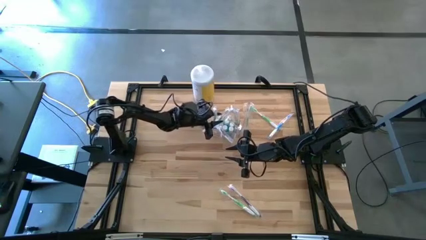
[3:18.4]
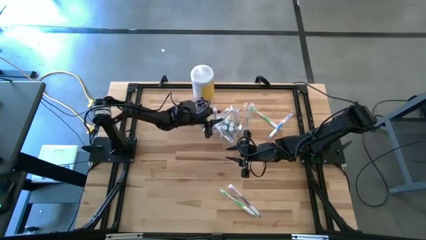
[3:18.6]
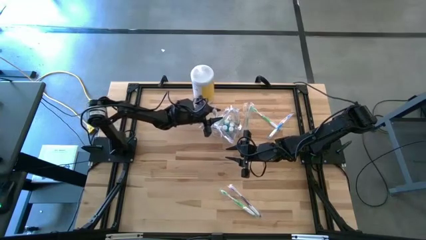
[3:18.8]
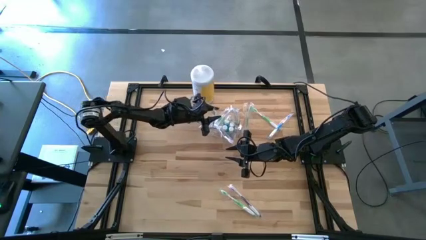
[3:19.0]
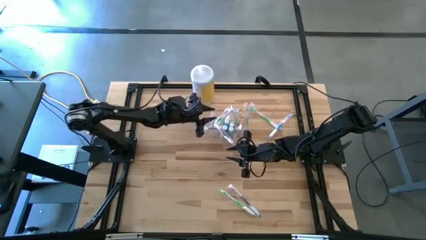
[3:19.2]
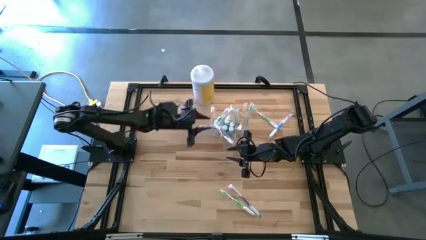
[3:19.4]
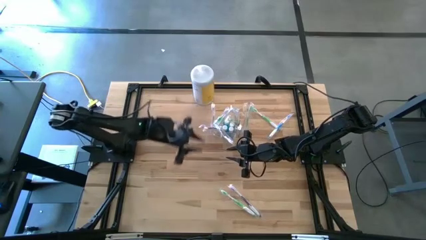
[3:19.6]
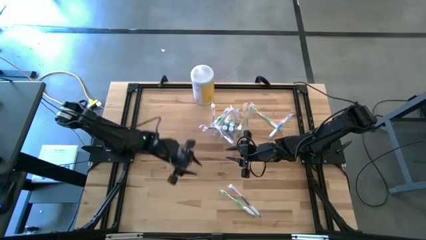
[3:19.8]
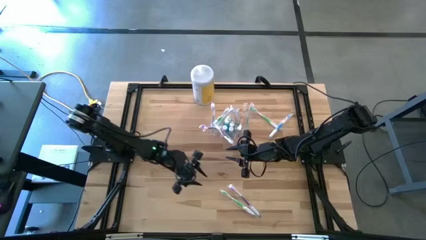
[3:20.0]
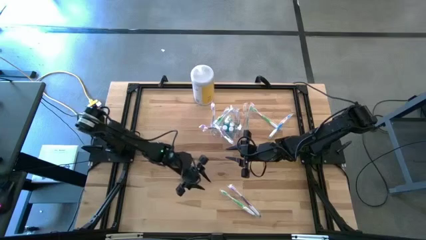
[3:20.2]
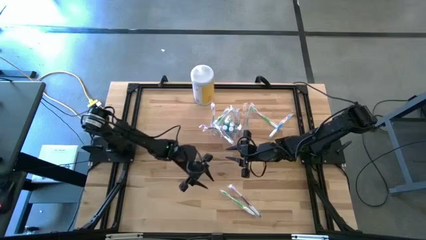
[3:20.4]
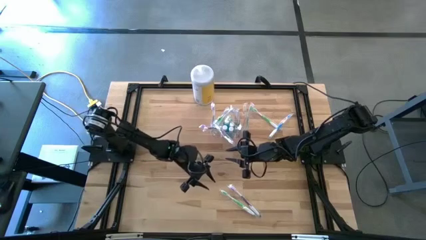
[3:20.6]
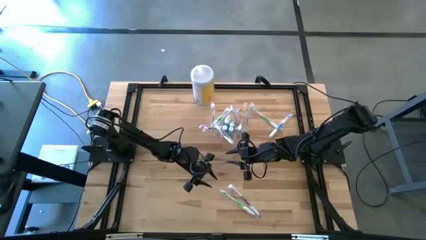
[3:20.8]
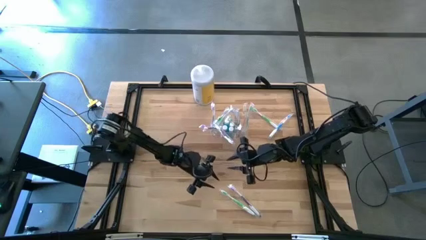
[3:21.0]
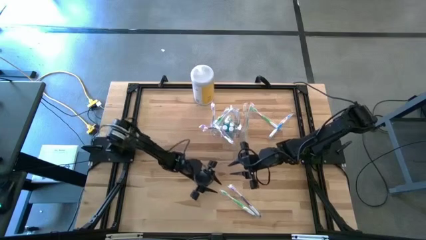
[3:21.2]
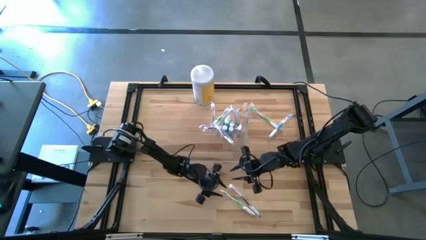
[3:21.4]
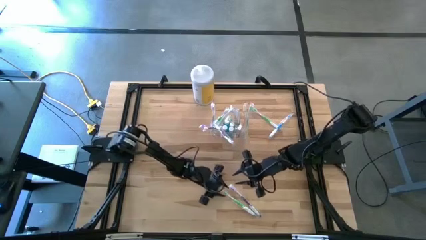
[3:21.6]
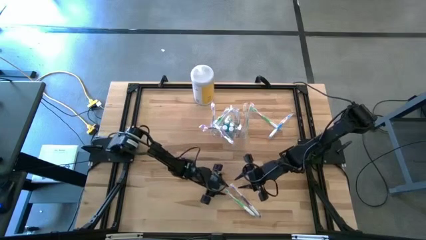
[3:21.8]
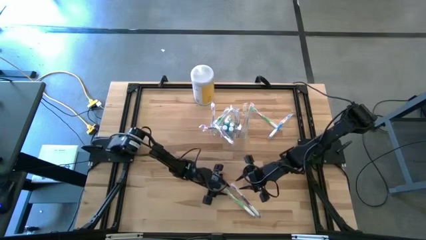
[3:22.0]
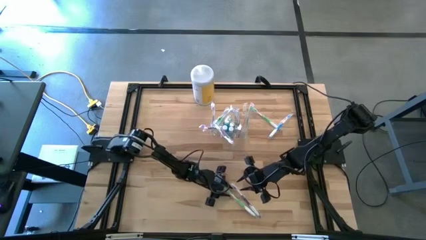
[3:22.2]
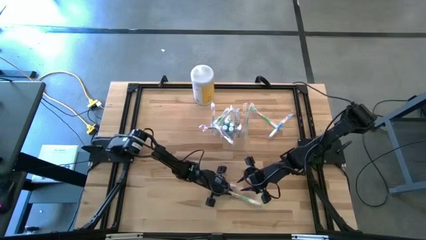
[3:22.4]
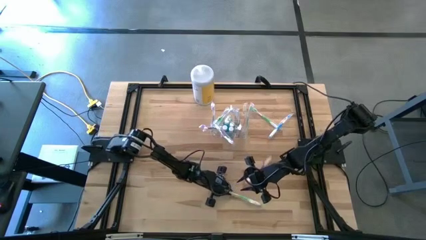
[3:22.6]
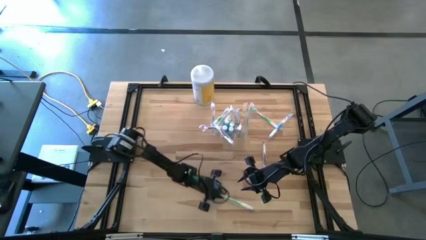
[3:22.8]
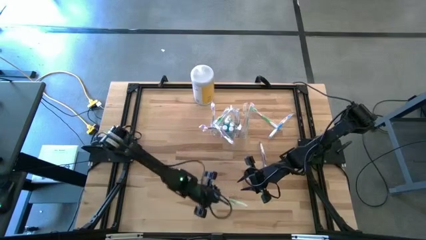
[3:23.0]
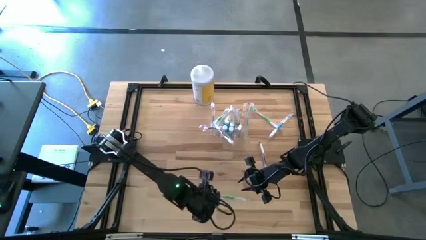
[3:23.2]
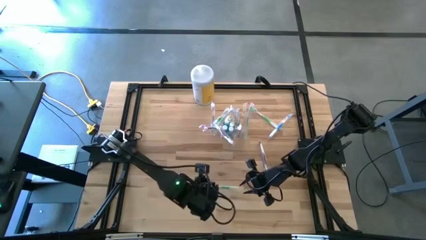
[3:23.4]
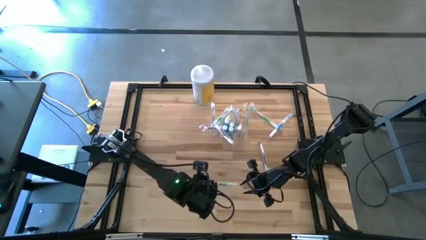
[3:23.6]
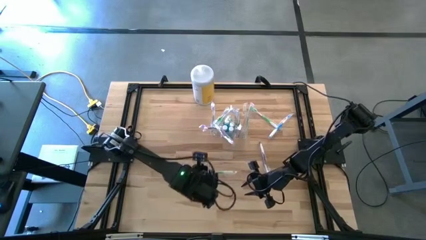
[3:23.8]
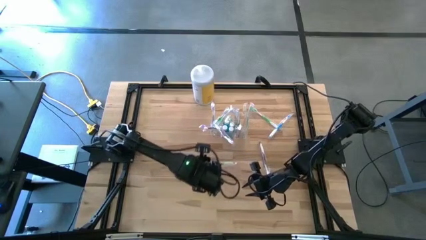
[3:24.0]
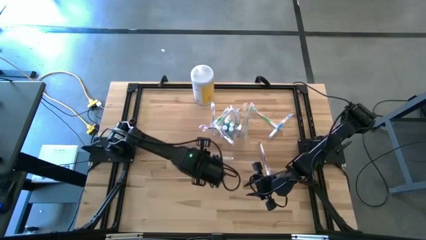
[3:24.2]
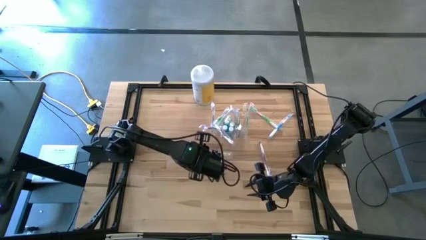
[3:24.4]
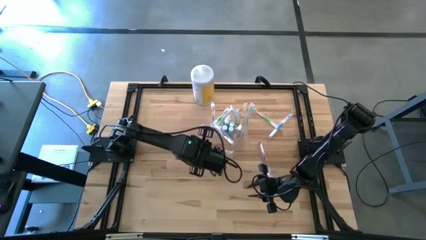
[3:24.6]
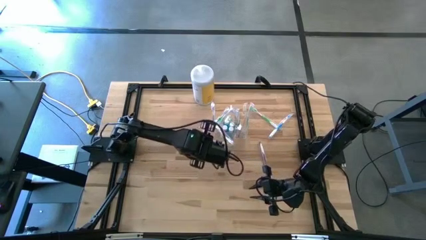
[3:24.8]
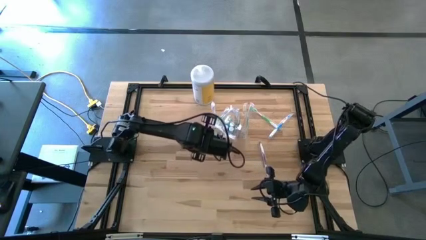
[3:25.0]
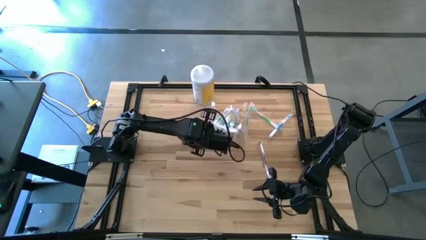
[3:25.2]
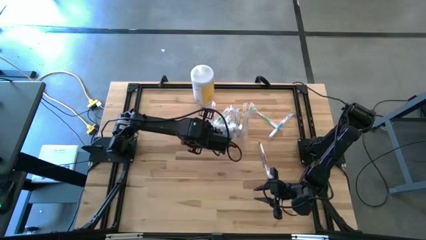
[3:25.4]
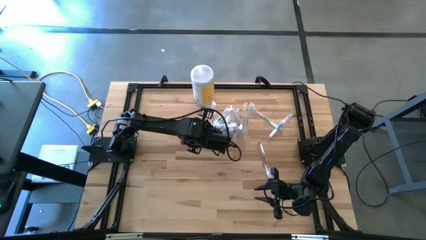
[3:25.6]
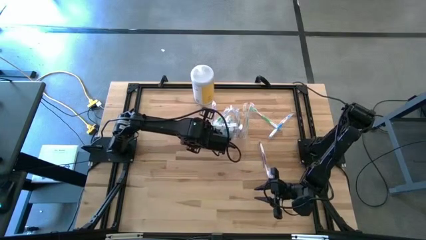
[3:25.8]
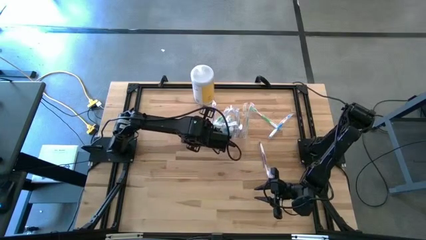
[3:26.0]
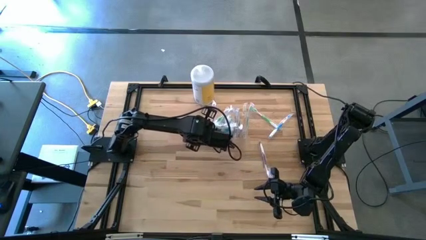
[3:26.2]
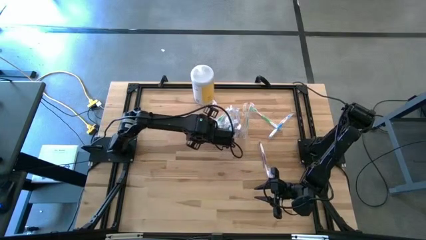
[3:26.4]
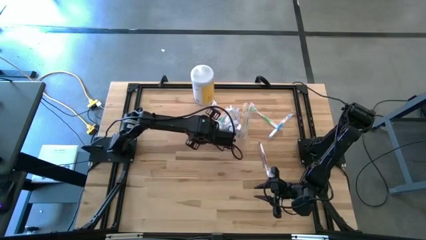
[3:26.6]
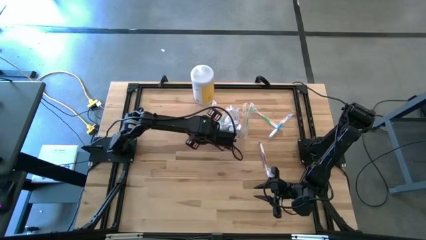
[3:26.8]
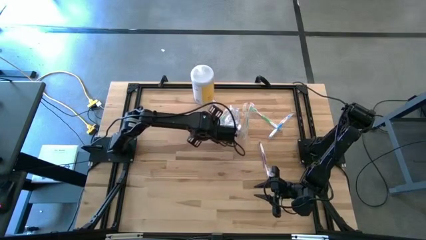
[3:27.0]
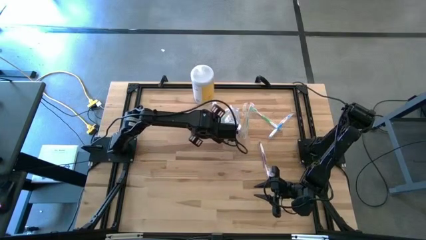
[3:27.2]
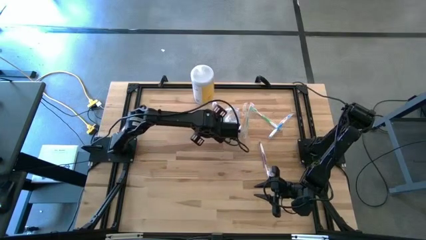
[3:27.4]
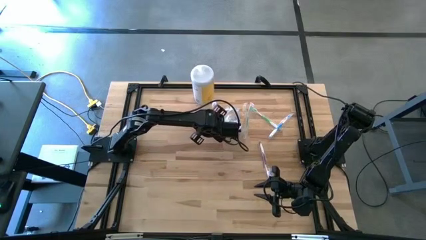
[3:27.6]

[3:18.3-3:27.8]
Task: Pick & Place toothbrushing station
Put the bottom green toothbrush into the transparent organizer

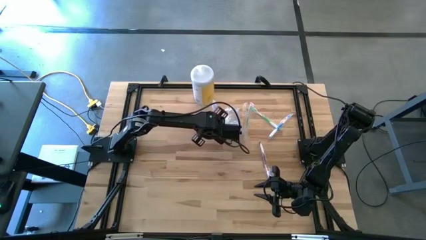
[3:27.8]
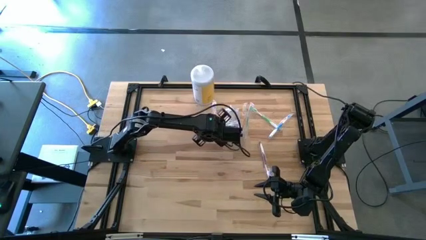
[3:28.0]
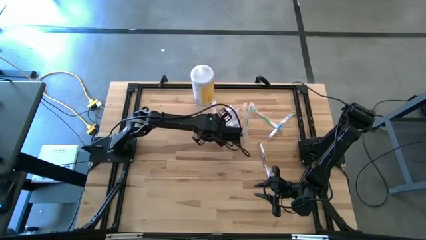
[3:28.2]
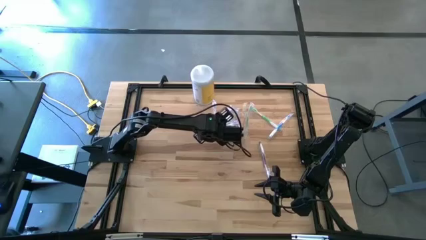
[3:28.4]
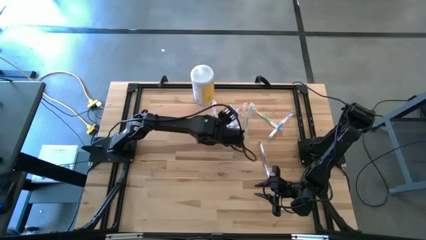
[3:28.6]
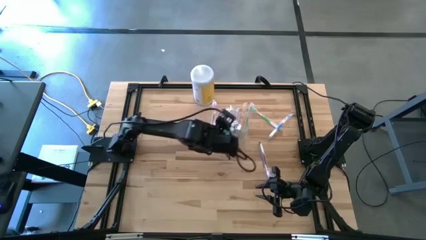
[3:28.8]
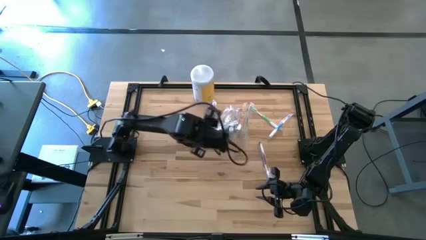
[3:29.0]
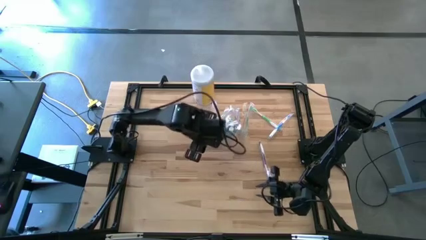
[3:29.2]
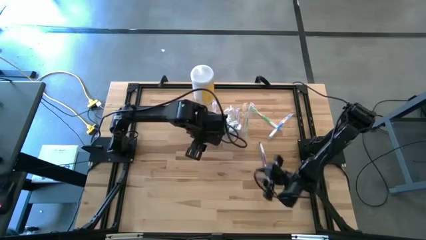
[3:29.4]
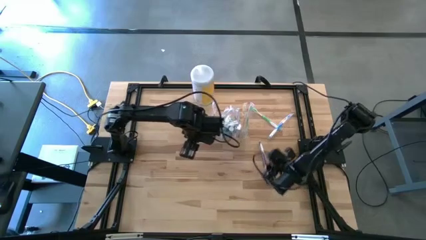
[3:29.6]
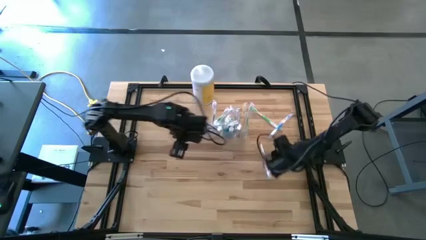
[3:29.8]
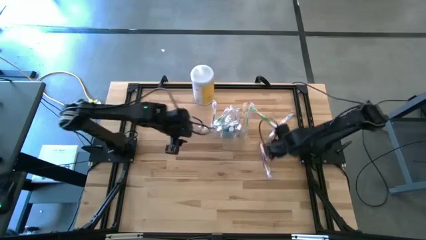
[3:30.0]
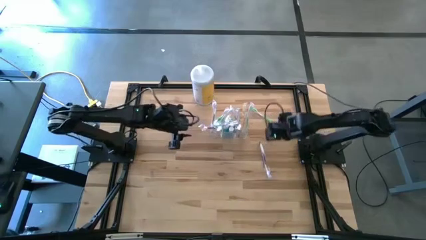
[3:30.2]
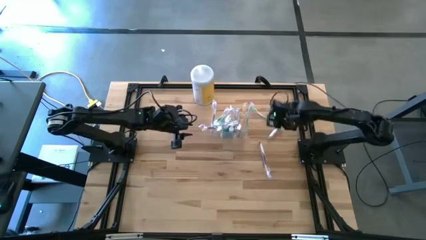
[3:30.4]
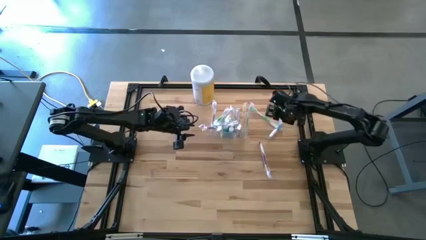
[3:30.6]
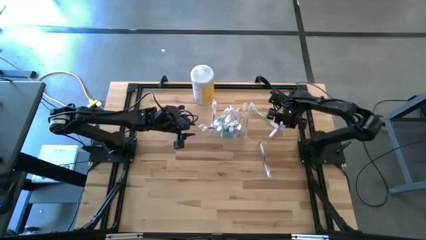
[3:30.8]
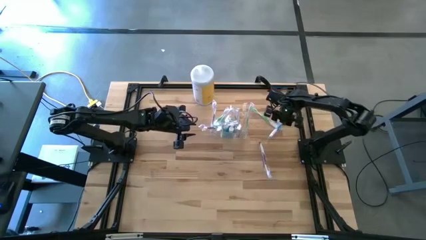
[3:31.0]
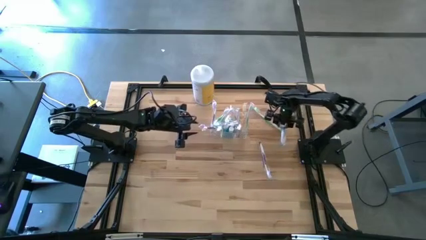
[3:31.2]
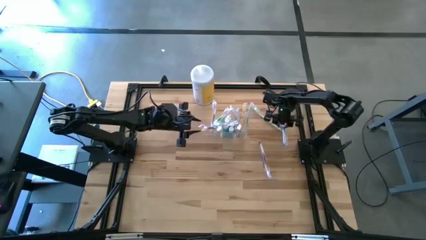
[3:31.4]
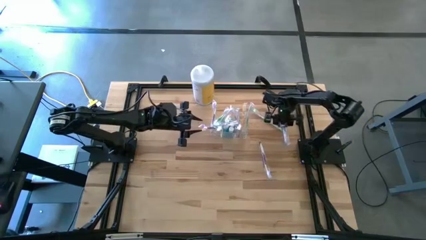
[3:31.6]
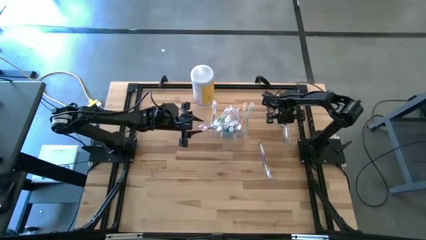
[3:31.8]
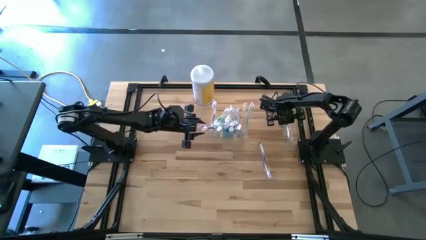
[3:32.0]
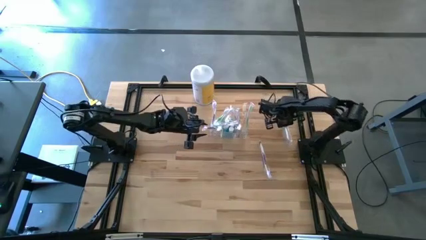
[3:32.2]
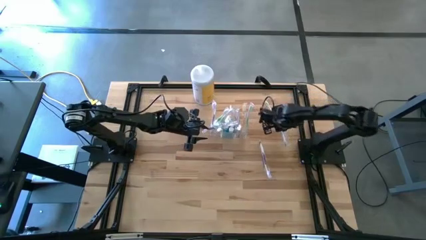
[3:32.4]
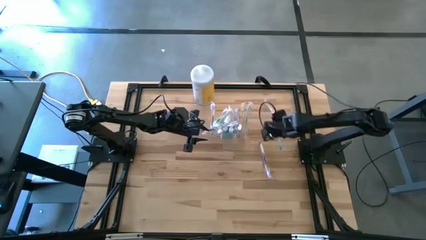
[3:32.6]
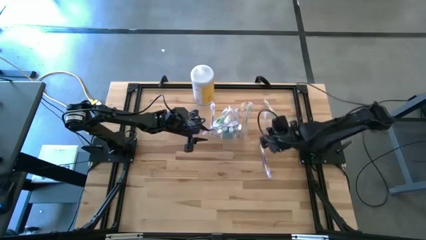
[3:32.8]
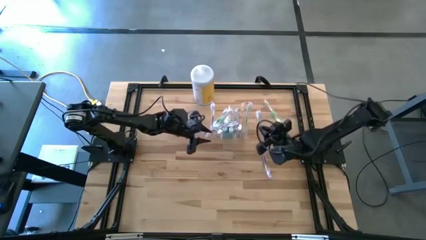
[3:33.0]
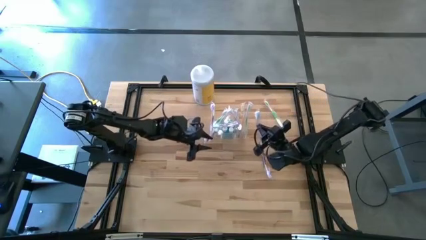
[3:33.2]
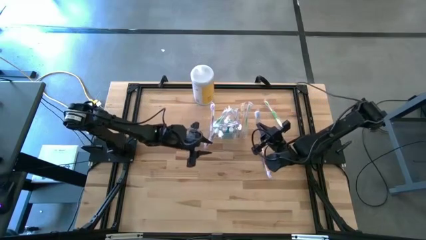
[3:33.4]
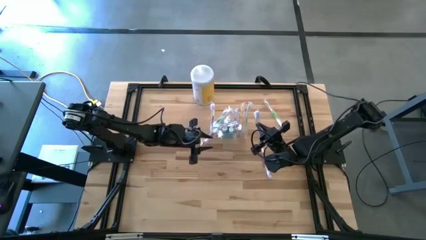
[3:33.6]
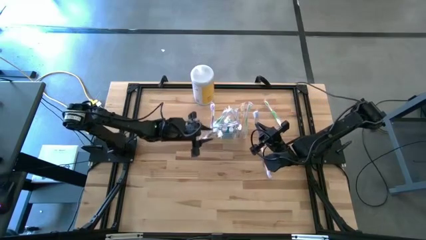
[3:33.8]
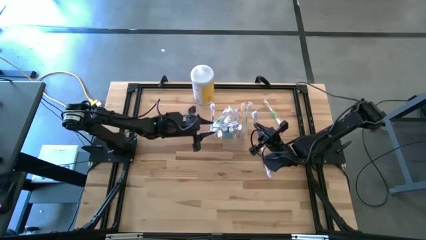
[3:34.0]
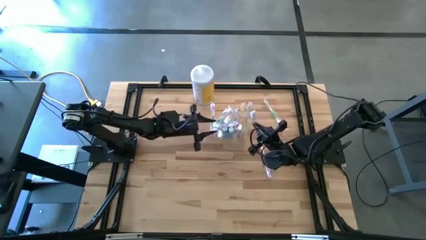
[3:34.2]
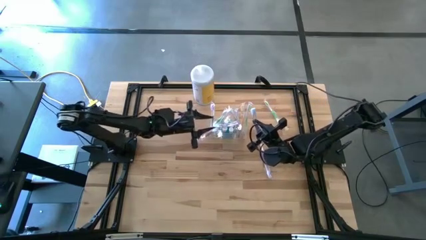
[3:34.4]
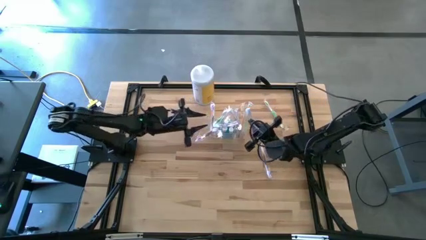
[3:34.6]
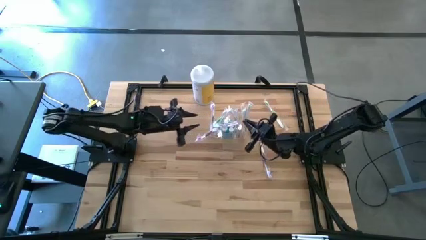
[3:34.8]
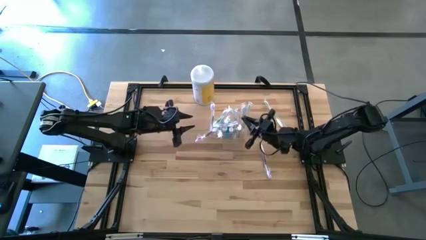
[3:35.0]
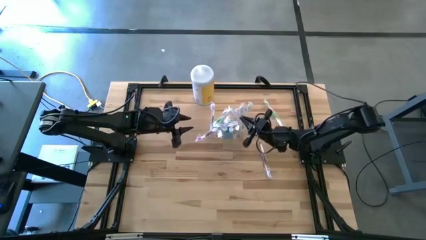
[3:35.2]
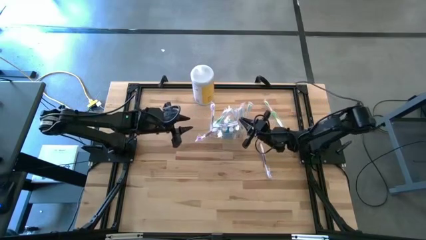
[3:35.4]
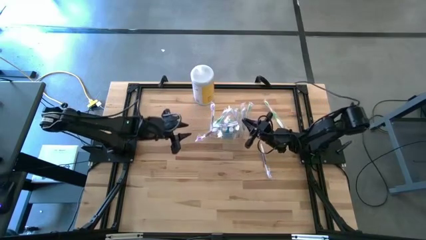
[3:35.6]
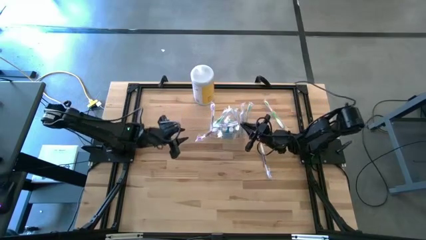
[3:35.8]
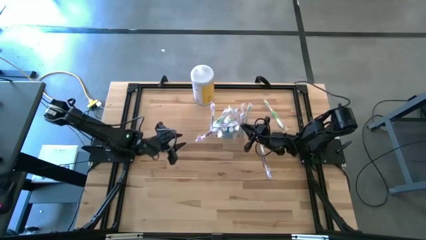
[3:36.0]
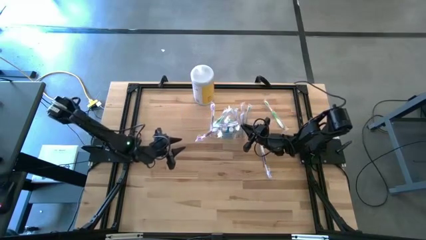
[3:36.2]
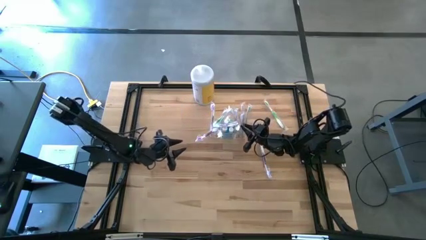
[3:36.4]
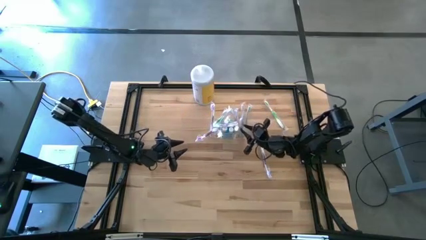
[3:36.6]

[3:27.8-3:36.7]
Put the blue toothbrush into the transparent organizer
